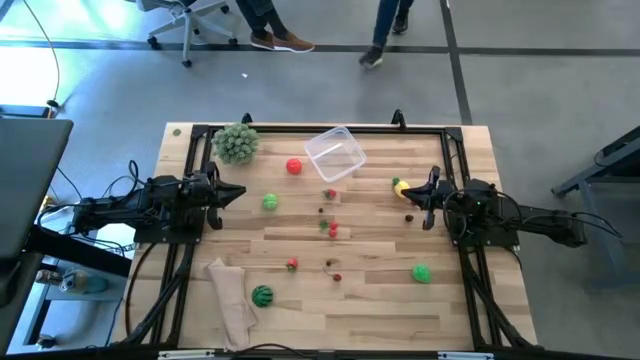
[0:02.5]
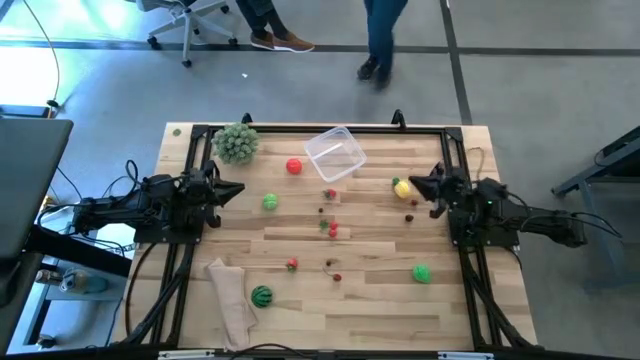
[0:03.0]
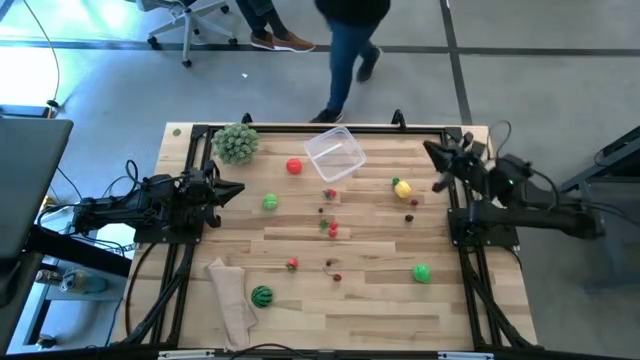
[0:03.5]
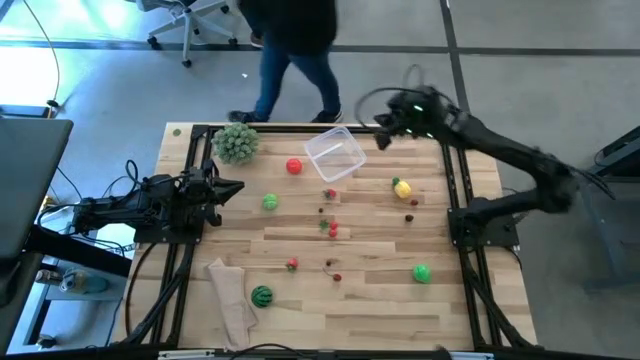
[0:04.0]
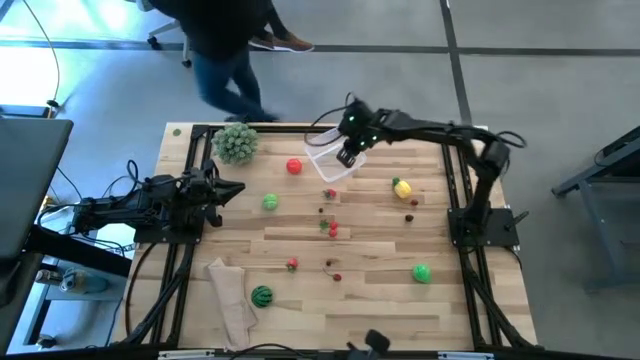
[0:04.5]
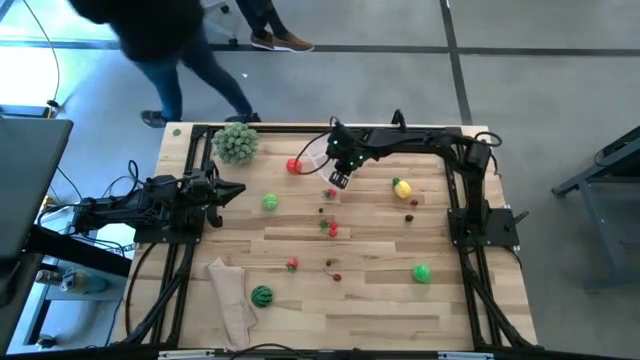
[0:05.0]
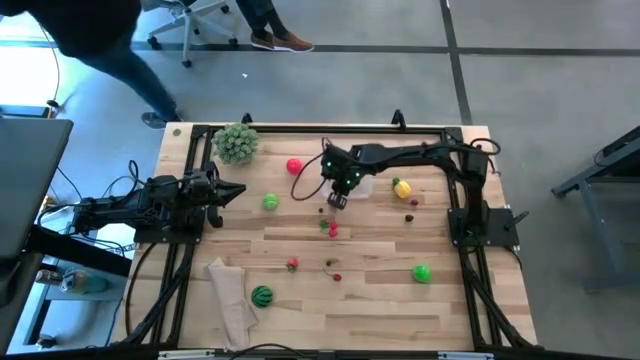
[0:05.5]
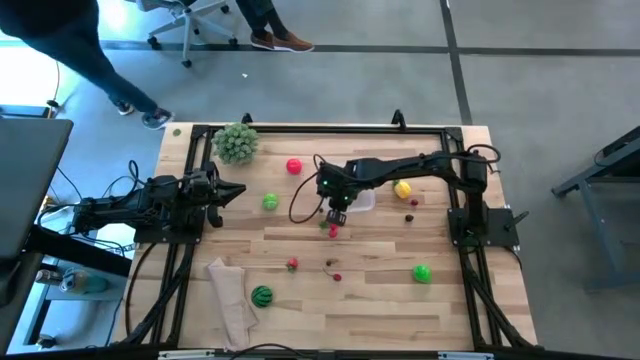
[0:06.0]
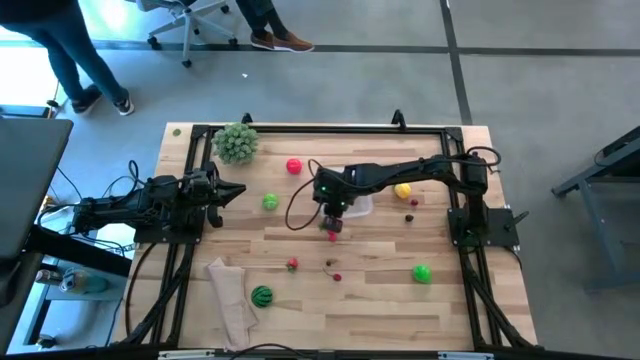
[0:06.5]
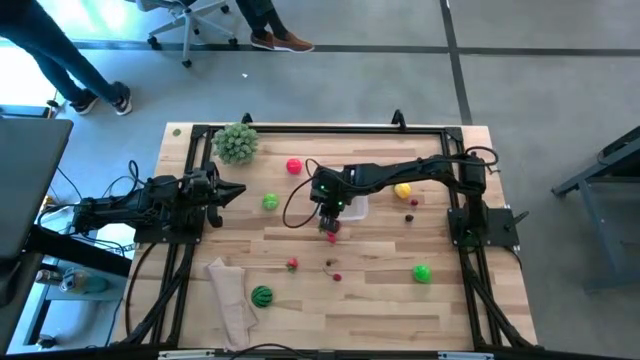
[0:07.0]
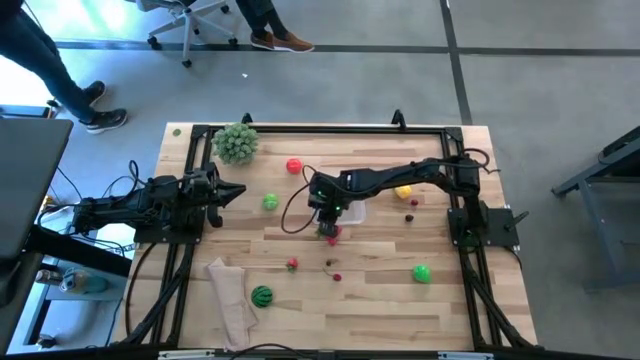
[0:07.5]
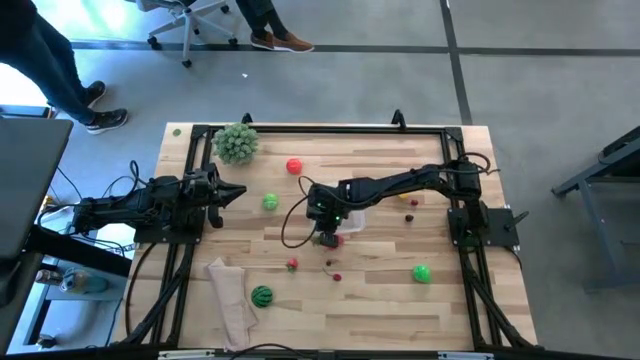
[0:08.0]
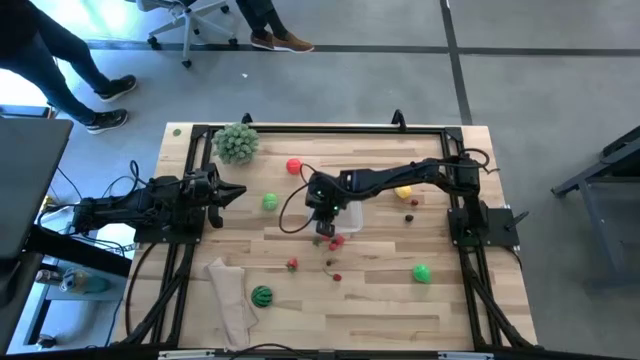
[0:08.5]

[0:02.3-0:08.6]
Task: Pick and placing Produce into tupperware
Move the transparent container to the center of the table

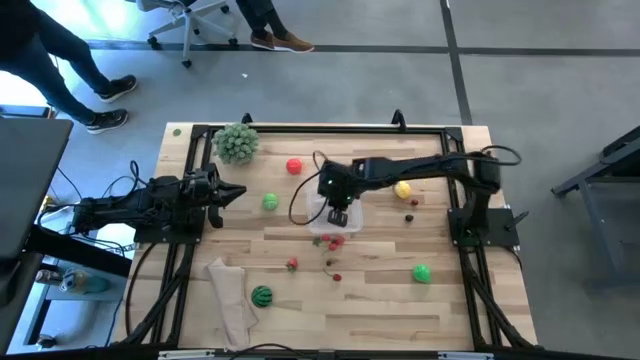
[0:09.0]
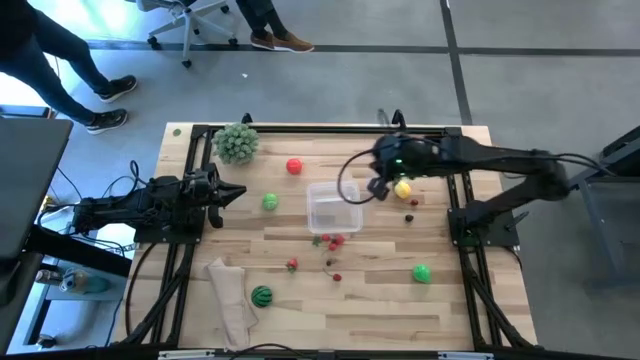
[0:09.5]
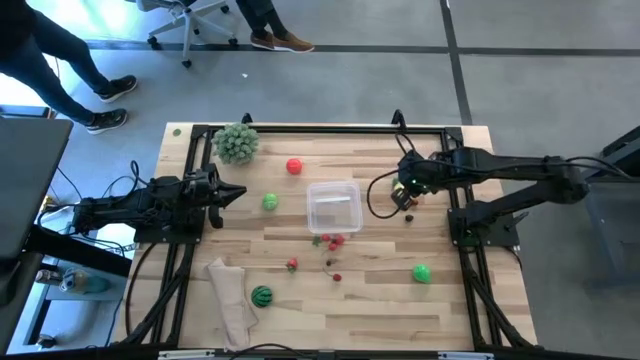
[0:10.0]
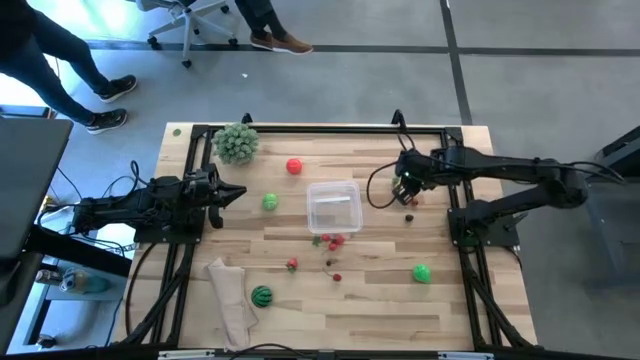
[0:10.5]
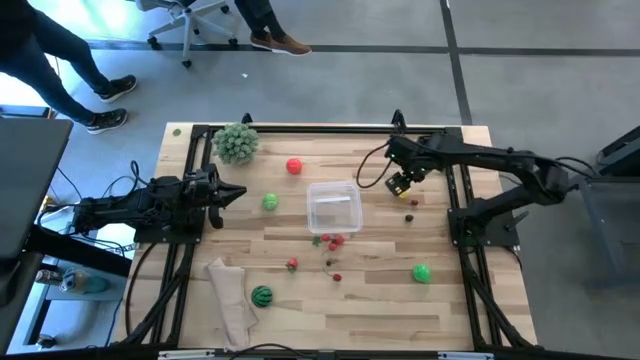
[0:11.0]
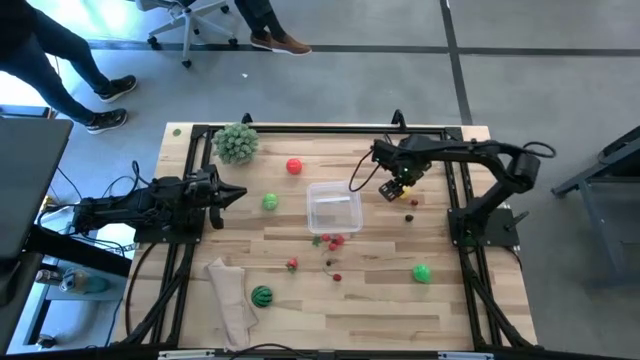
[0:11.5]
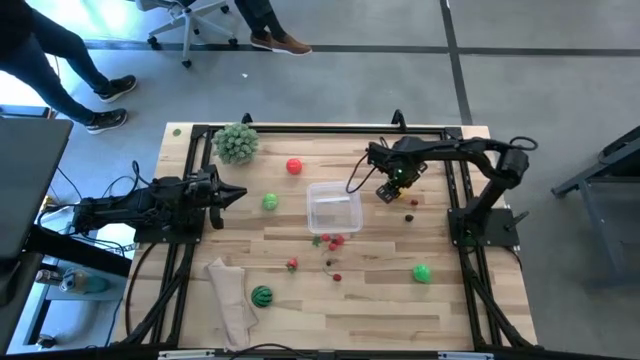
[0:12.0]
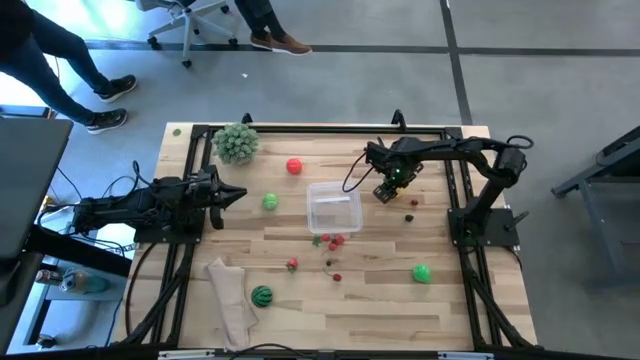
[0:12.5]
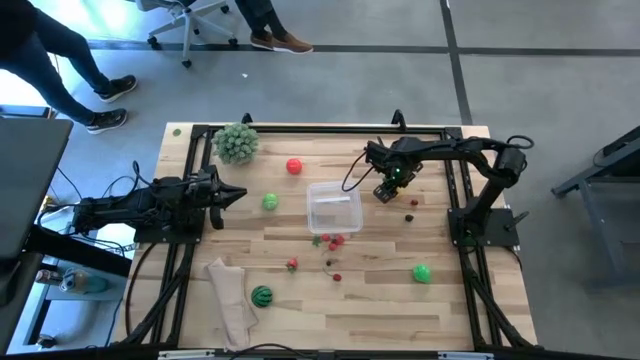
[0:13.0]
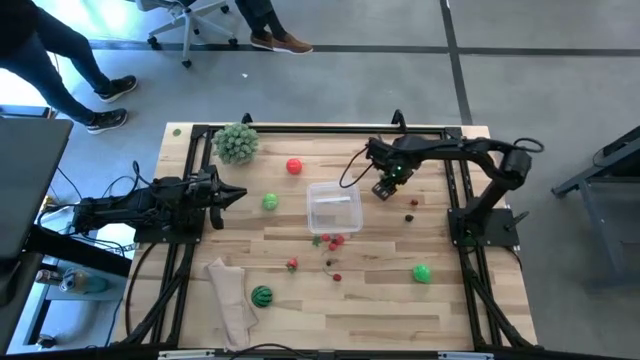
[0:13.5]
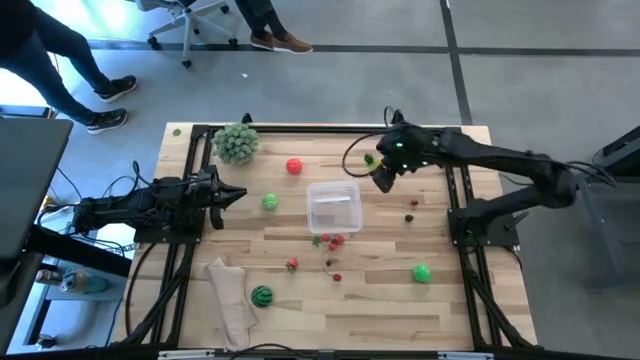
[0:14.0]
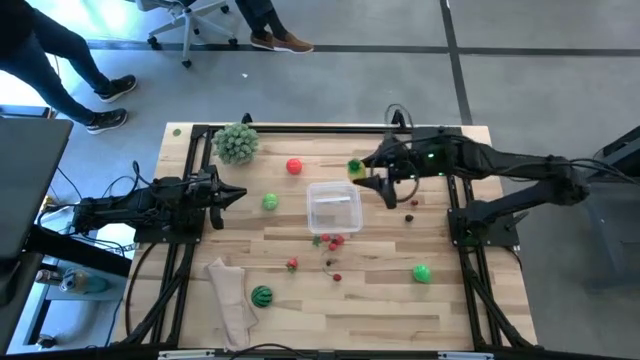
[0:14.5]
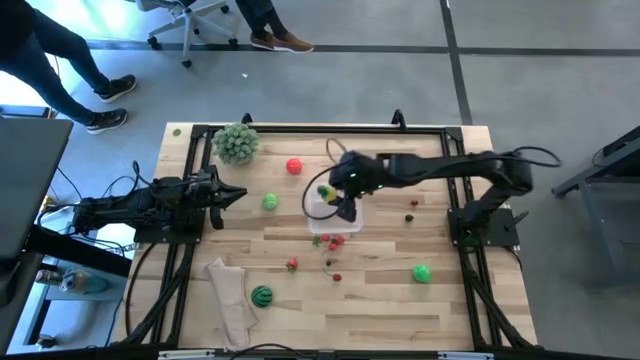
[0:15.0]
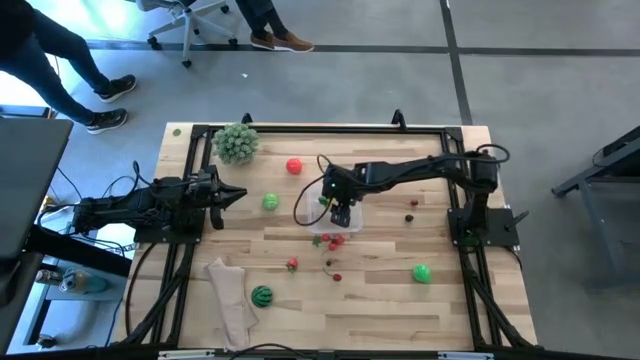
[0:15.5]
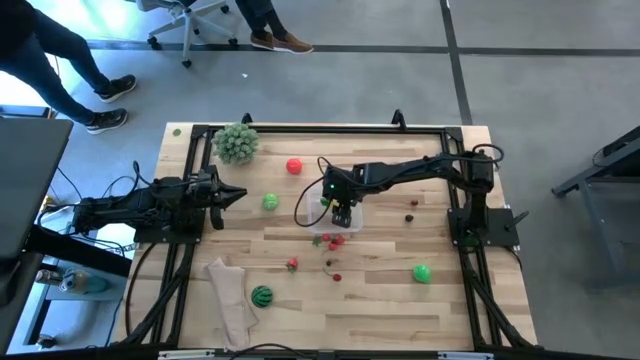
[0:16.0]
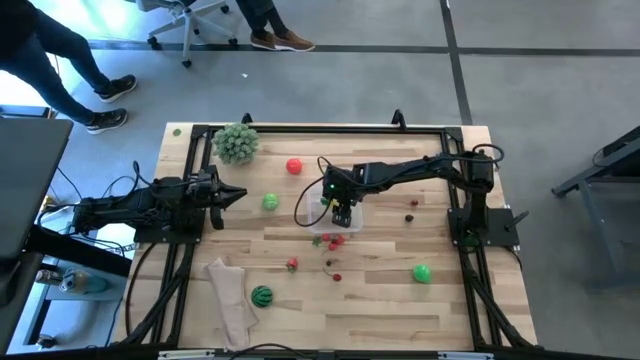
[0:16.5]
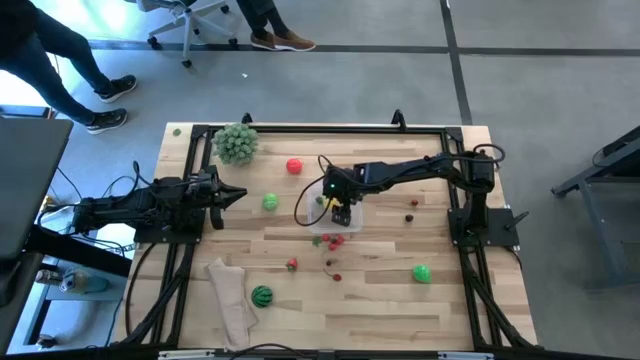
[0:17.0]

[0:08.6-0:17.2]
Put the yellow pineapple into the transparent container

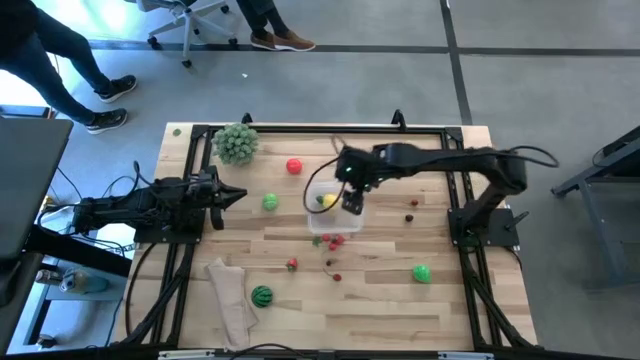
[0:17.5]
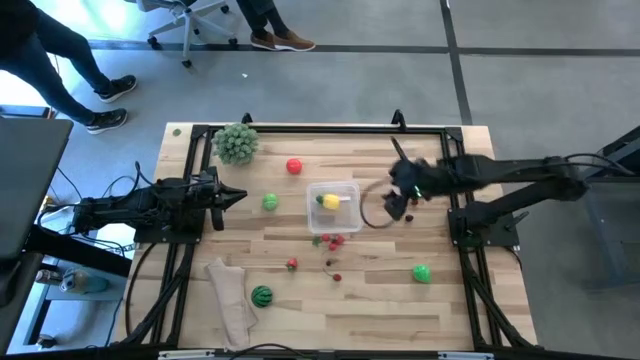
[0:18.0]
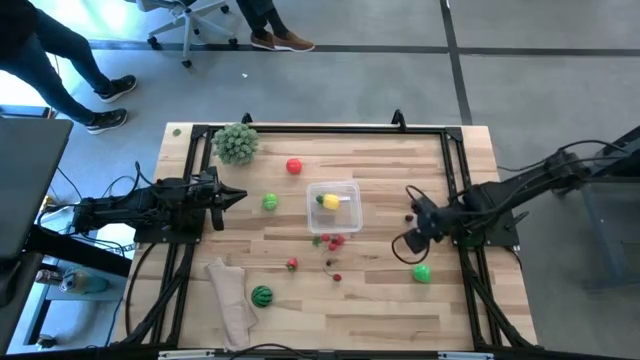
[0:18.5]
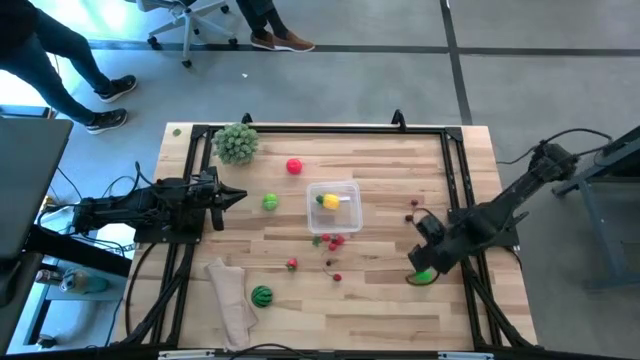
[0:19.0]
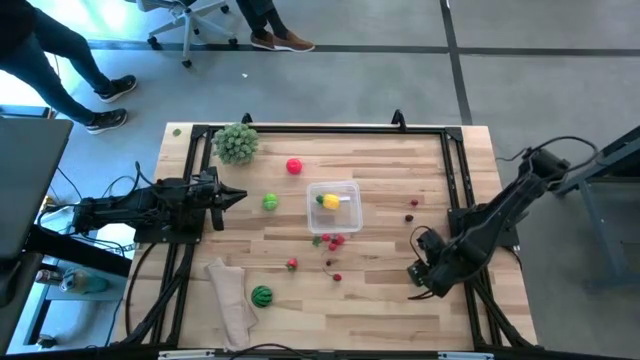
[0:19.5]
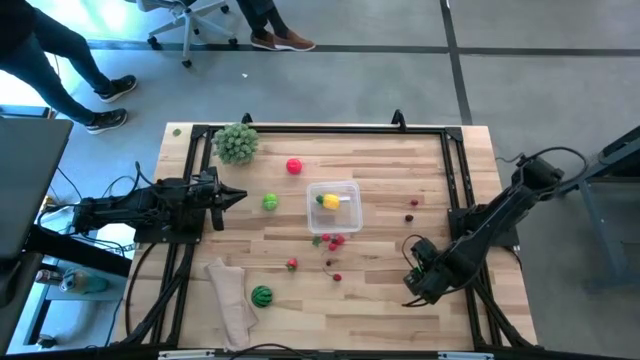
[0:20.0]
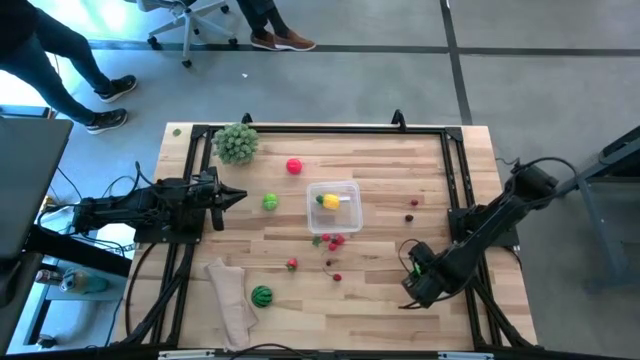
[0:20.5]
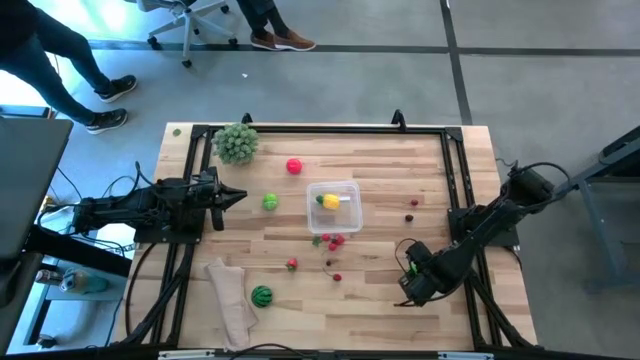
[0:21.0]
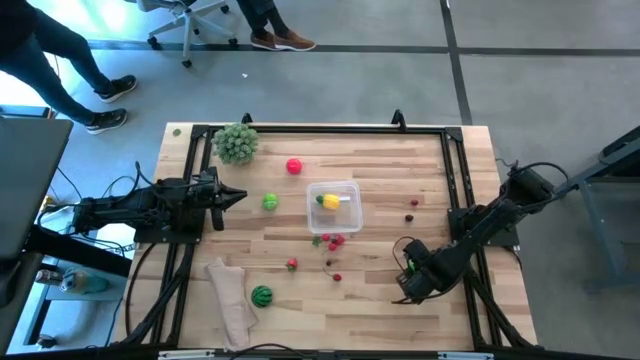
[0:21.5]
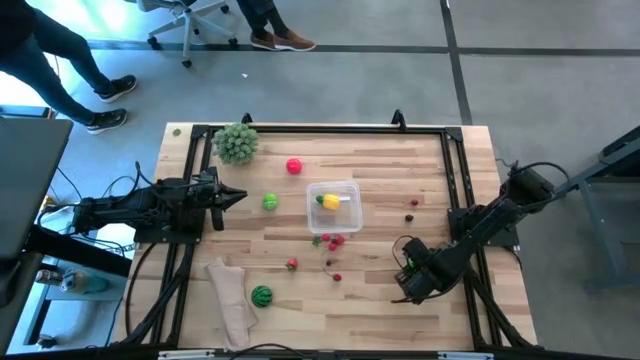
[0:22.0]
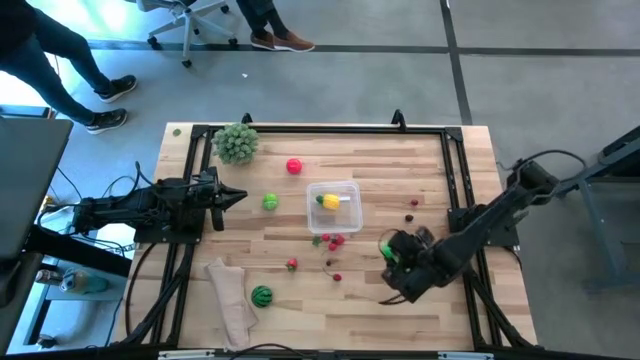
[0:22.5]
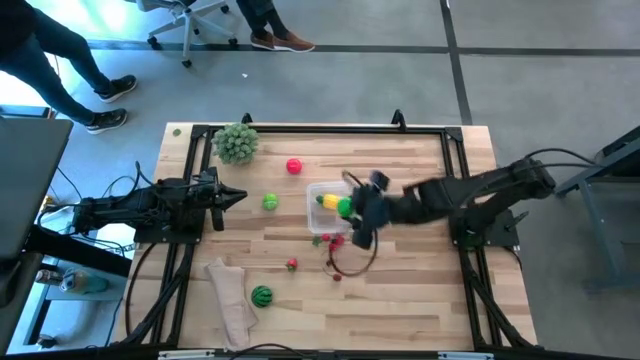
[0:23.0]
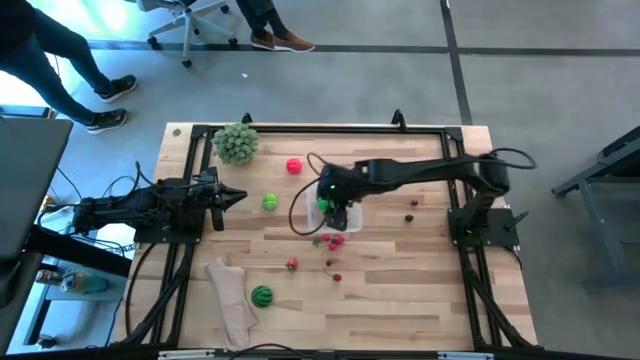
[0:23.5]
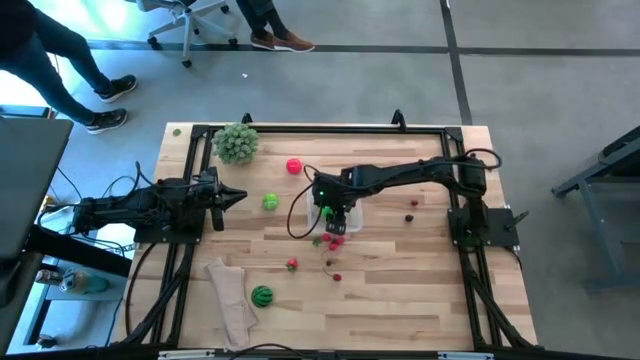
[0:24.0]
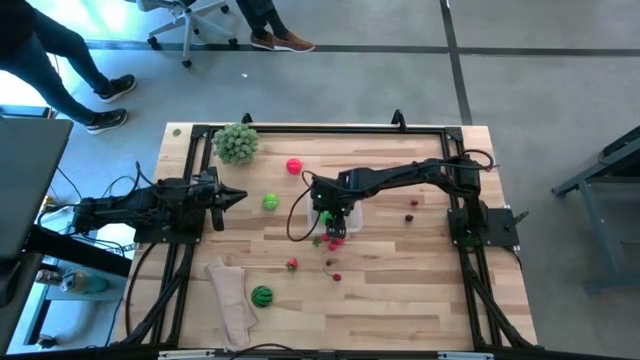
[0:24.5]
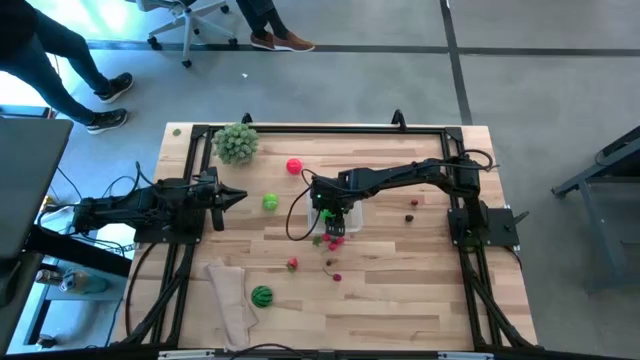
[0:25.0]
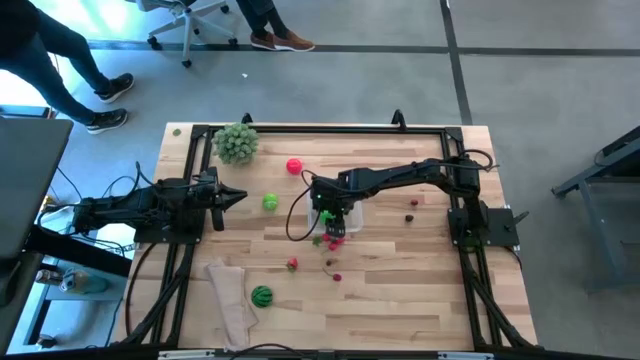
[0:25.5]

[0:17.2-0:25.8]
Put the green pear into the transparent container
